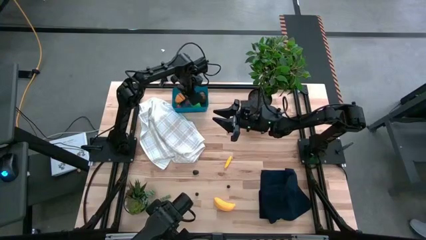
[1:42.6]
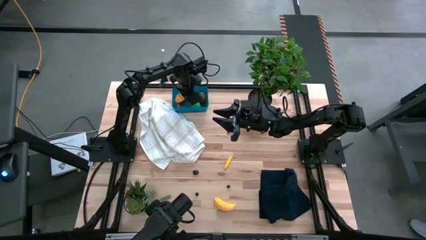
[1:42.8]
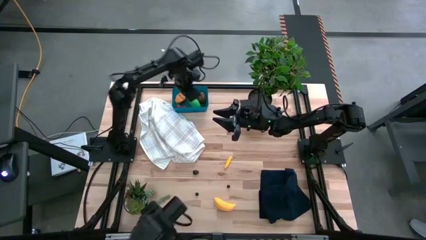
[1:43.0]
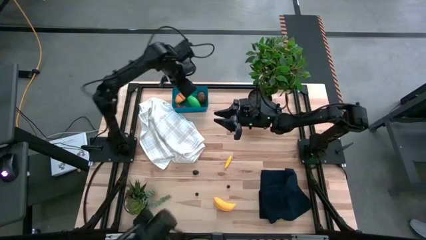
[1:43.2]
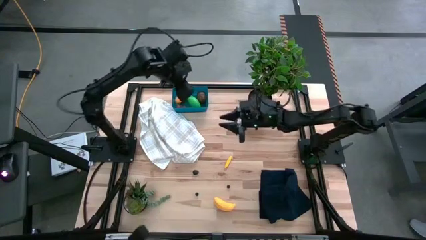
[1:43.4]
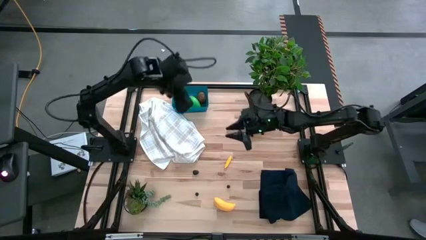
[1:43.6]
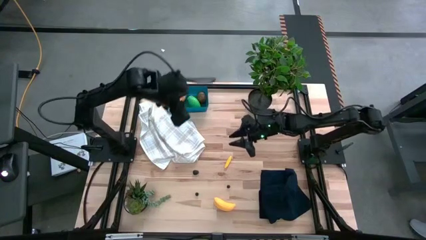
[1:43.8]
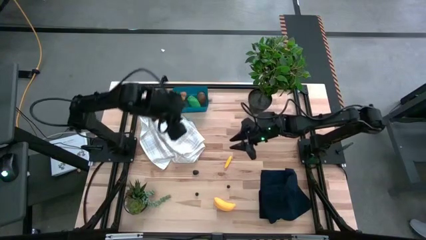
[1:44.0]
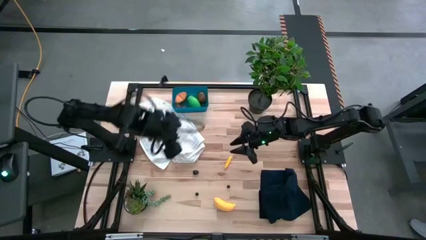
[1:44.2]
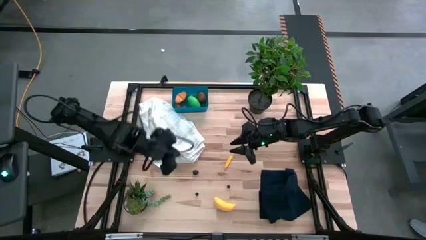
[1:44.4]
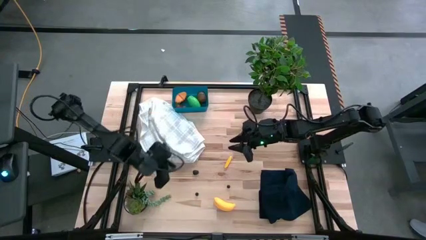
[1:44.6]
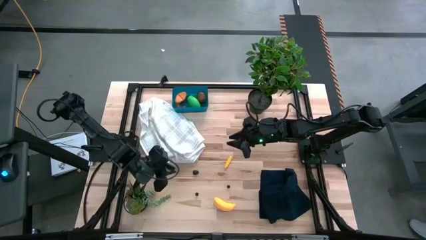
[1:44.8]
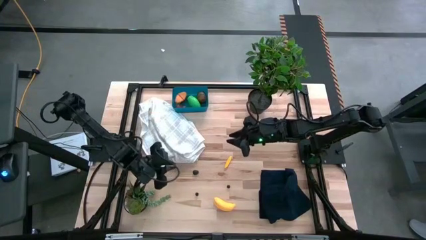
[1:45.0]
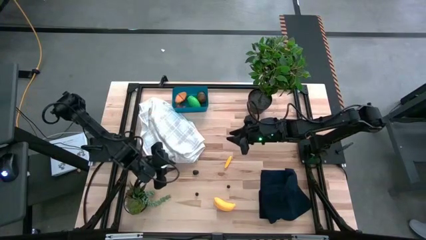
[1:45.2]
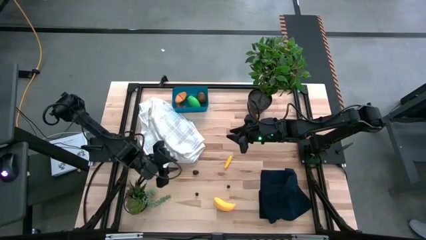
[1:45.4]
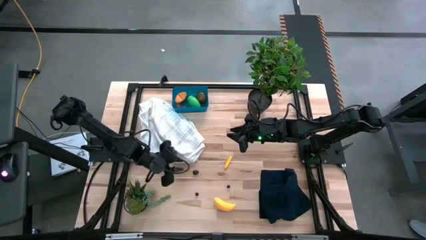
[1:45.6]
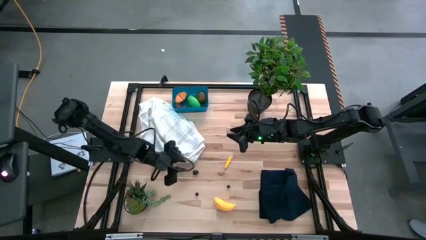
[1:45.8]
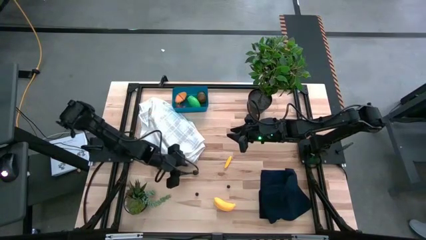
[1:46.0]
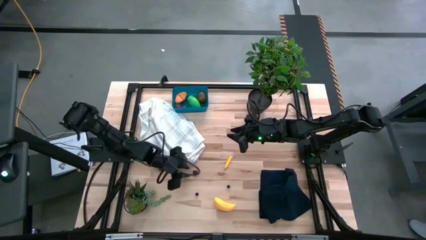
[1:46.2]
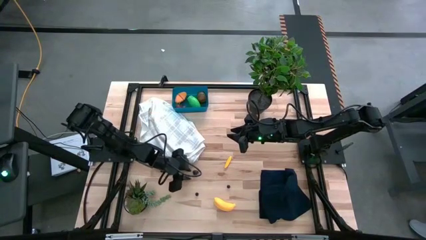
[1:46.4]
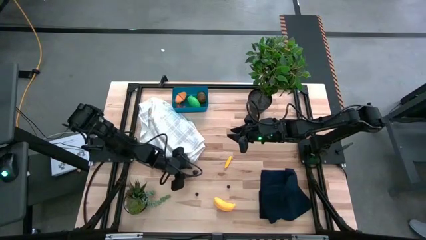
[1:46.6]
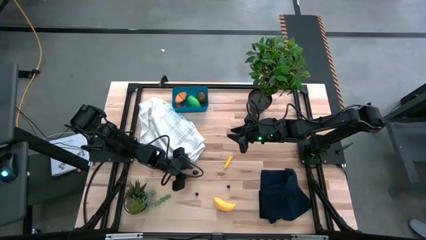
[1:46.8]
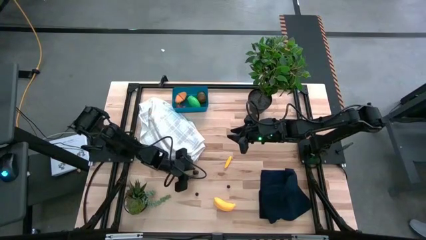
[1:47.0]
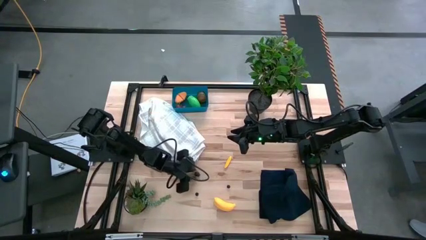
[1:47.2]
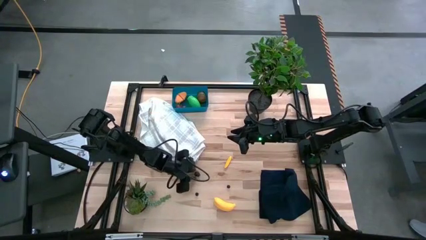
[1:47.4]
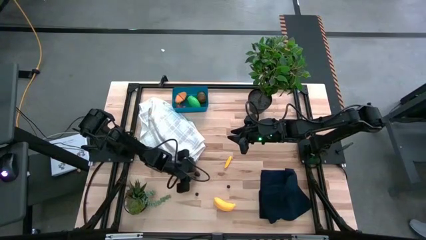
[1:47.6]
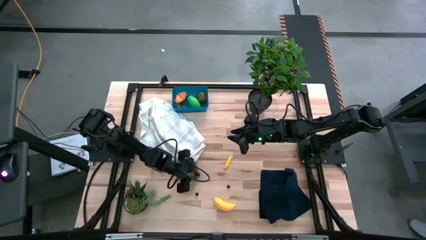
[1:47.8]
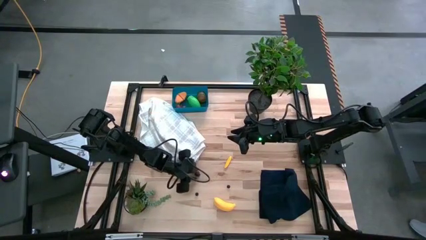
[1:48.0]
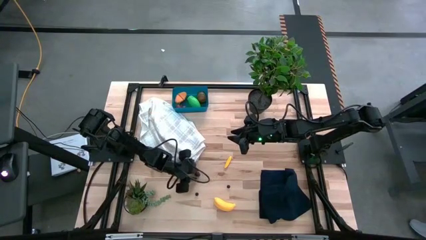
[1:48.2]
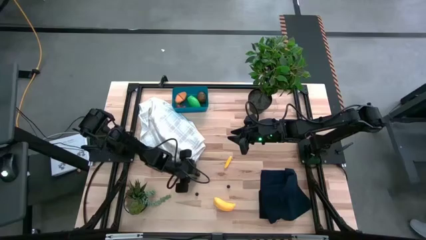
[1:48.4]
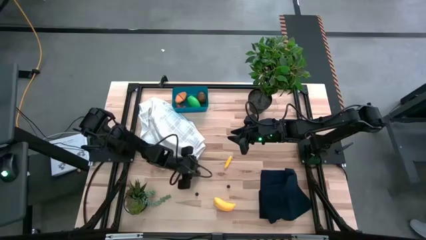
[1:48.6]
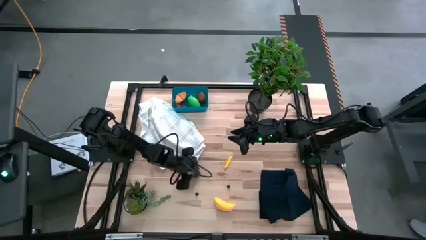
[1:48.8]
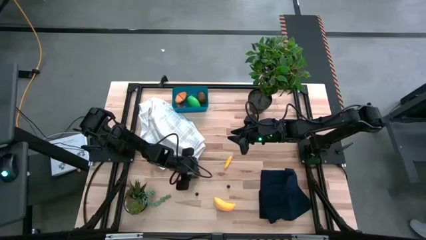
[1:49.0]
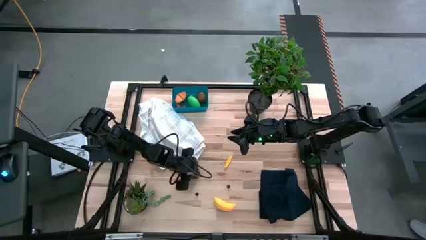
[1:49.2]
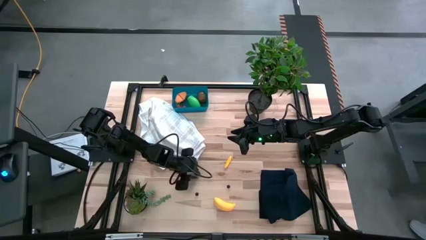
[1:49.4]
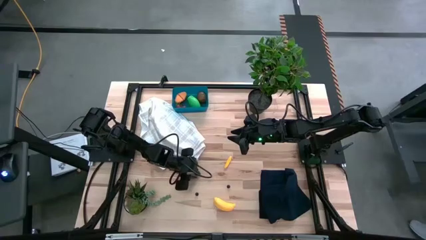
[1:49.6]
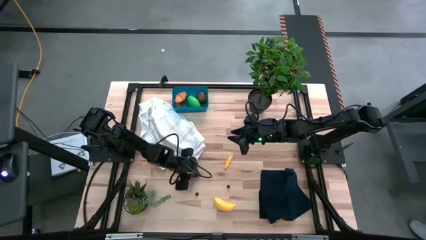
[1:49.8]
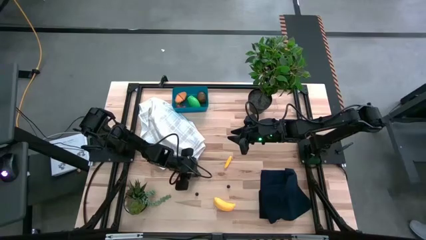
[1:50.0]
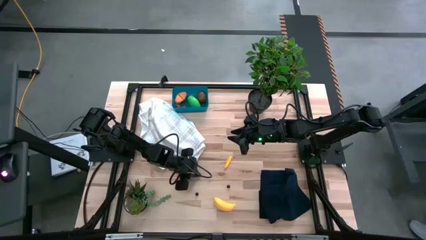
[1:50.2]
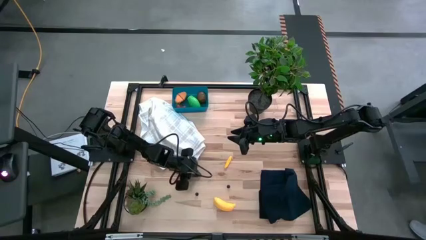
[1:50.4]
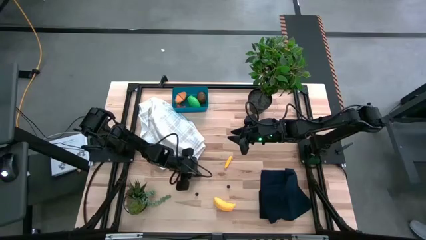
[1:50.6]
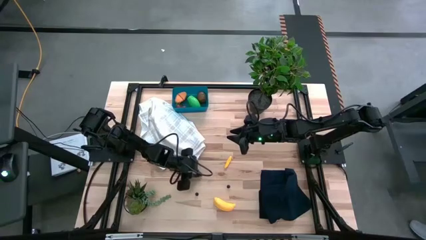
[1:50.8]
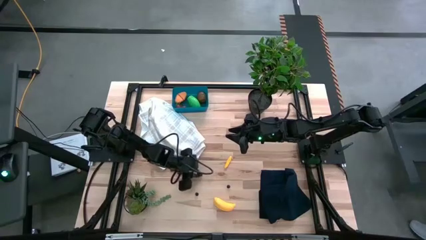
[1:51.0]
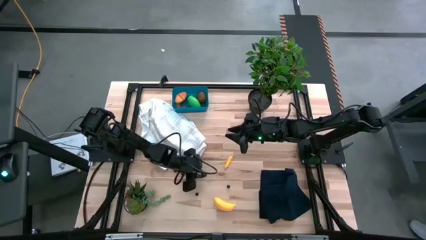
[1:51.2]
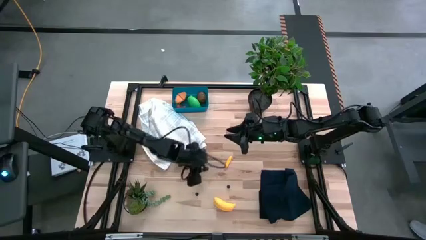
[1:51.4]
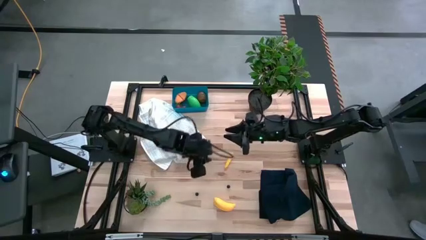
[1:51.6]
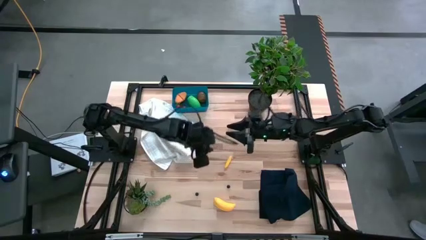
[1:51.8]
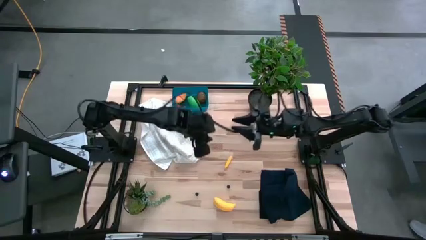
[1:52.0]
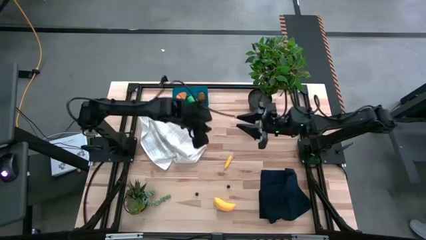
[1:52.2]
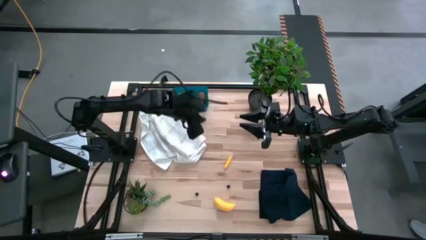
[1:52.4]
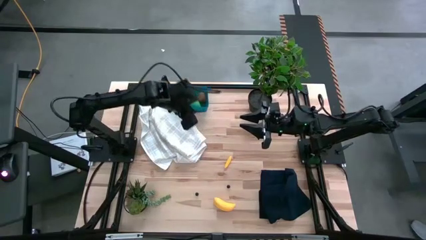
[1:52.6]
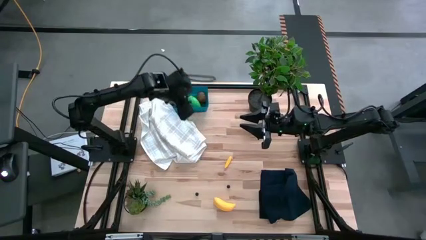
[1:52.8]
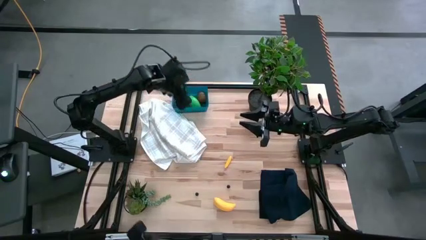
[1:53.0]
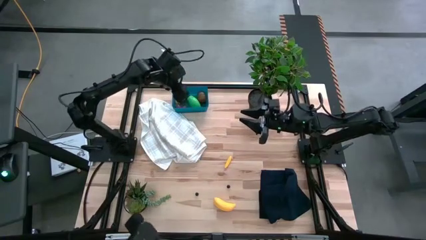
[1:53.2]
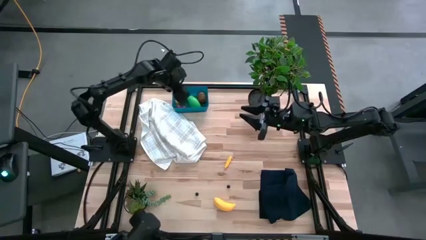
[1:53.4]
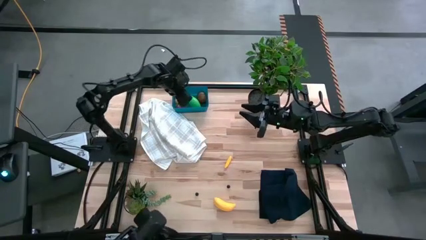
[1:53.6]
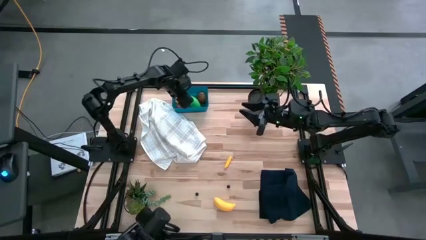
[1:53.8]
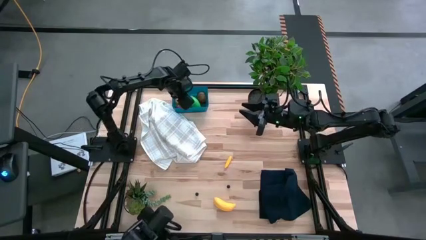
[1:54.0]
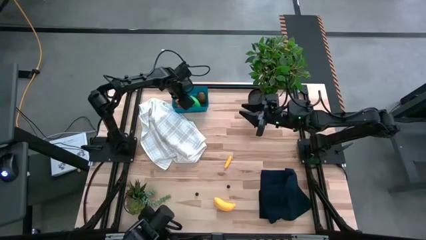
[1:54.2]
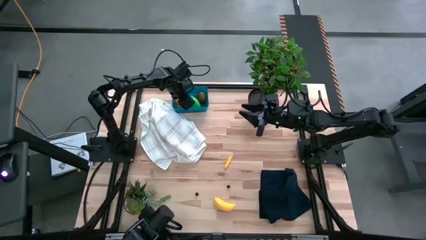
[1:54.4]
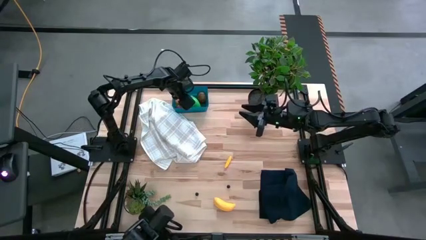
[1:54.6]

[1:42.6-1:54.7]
Task: Pick and placing Produce into tupperware
Put the blackberry into the blue bin
